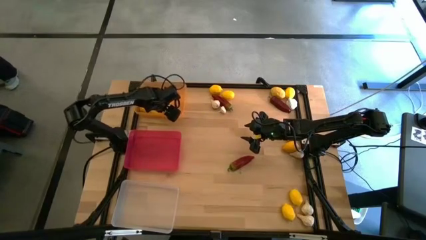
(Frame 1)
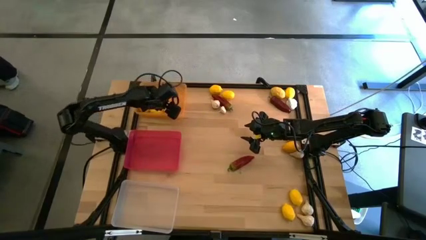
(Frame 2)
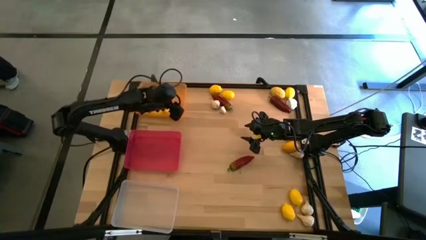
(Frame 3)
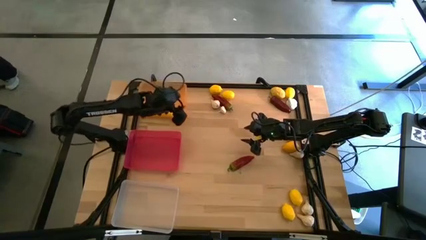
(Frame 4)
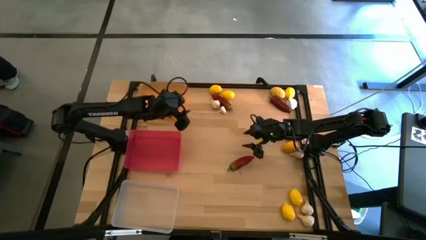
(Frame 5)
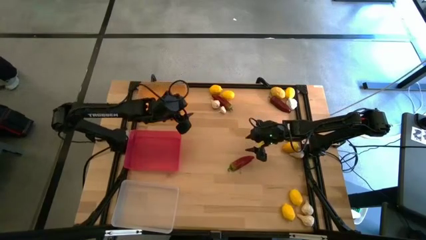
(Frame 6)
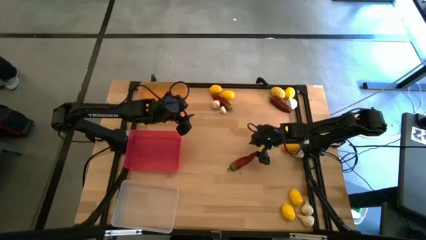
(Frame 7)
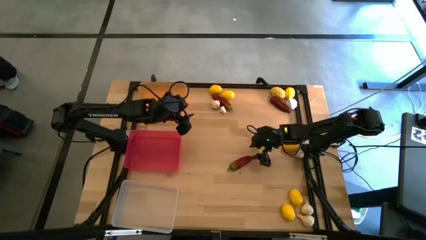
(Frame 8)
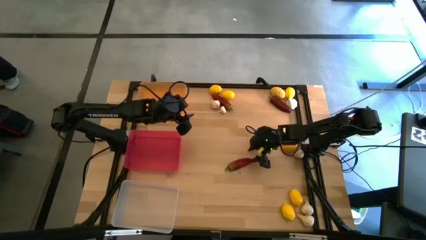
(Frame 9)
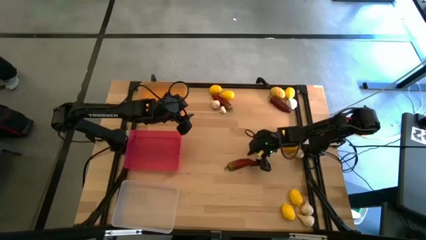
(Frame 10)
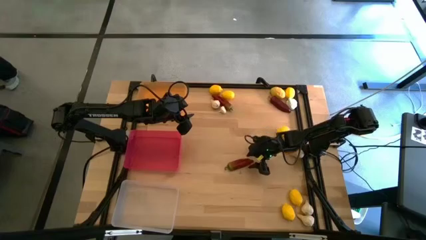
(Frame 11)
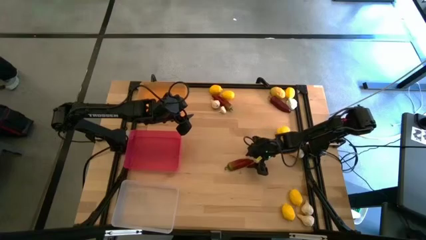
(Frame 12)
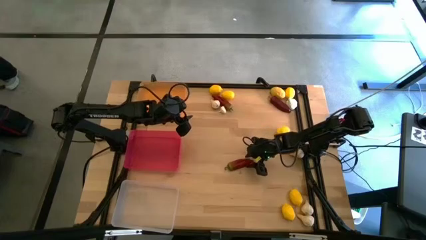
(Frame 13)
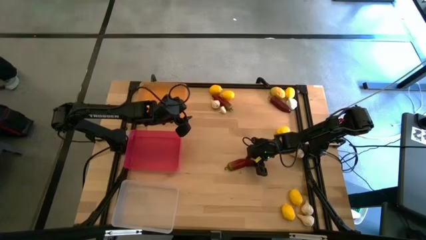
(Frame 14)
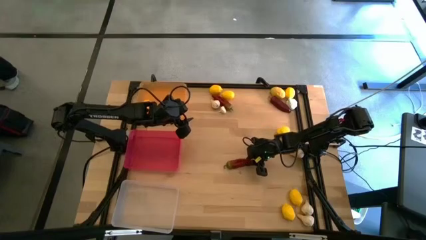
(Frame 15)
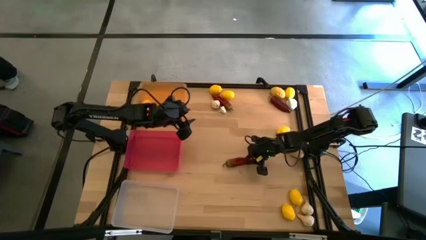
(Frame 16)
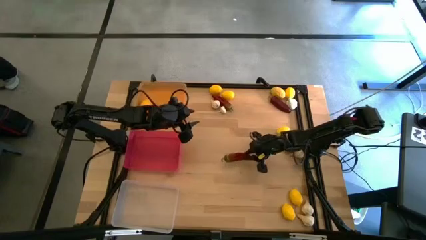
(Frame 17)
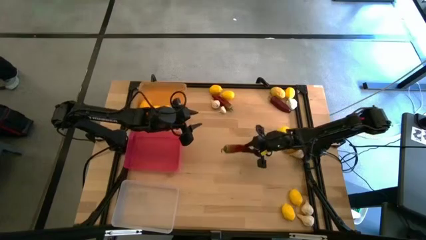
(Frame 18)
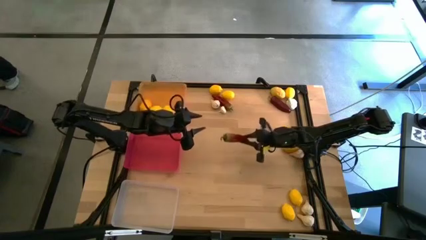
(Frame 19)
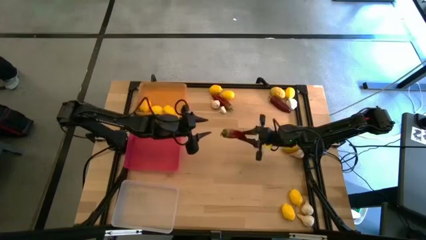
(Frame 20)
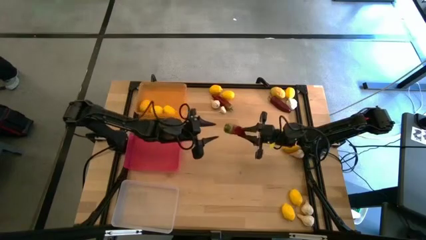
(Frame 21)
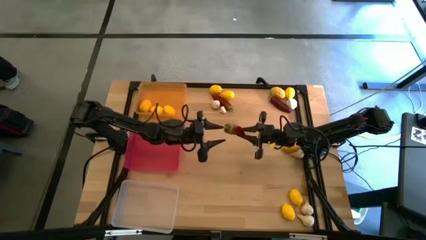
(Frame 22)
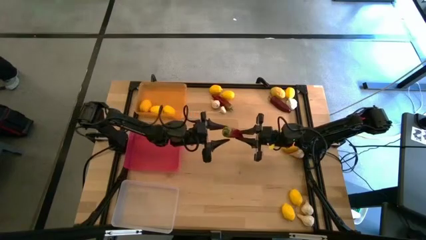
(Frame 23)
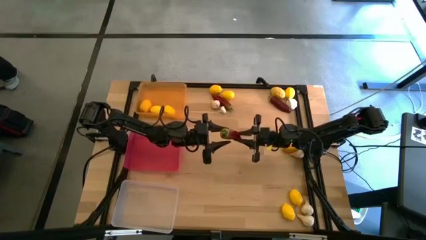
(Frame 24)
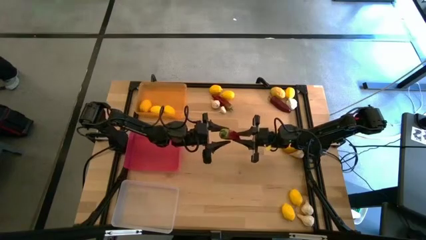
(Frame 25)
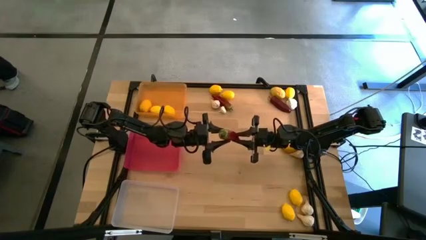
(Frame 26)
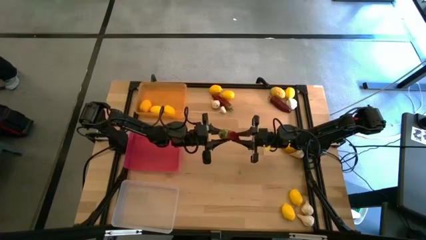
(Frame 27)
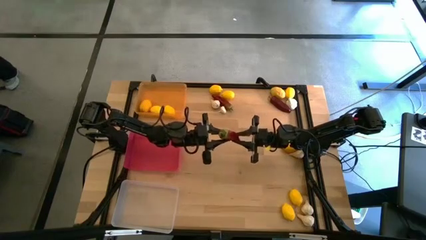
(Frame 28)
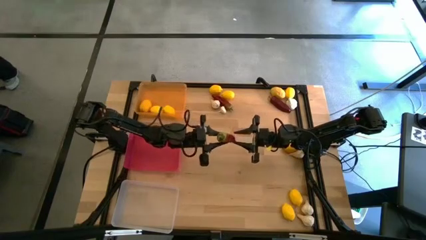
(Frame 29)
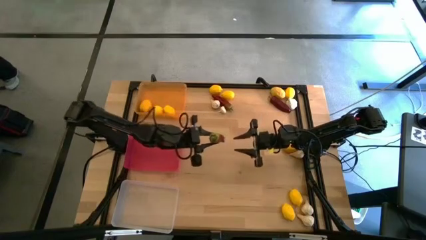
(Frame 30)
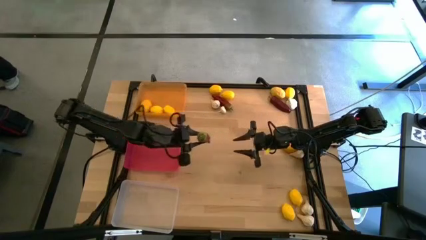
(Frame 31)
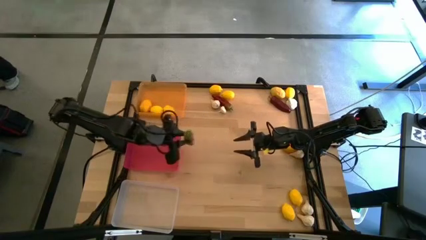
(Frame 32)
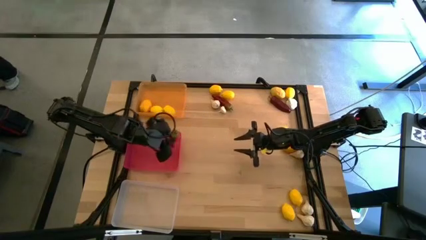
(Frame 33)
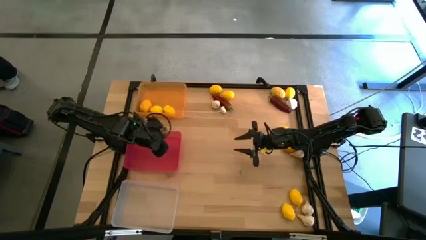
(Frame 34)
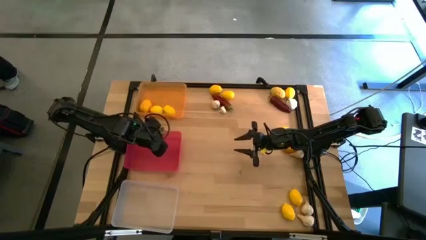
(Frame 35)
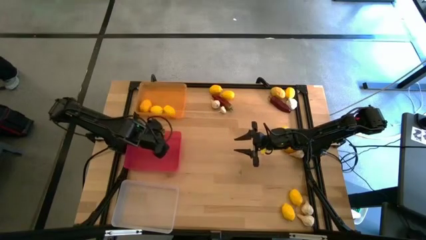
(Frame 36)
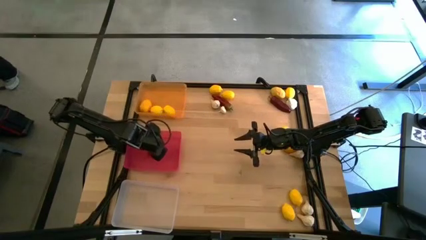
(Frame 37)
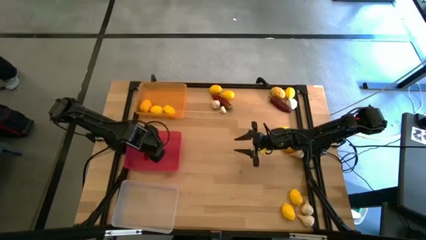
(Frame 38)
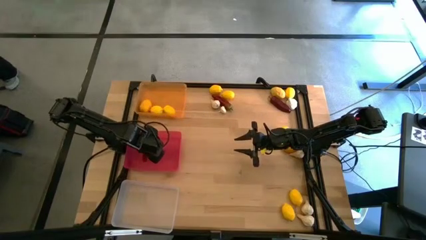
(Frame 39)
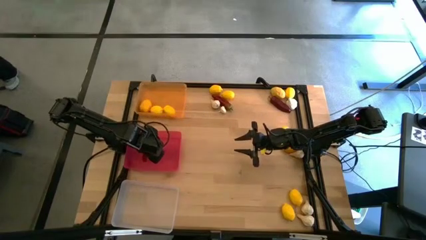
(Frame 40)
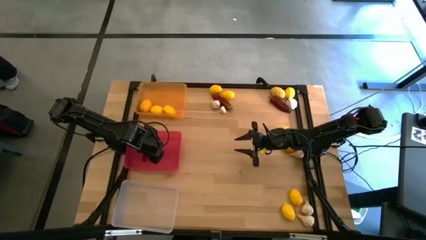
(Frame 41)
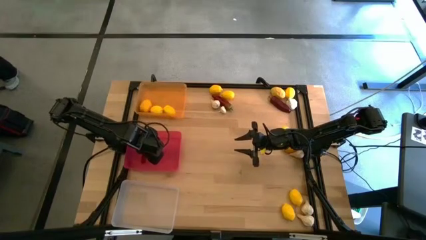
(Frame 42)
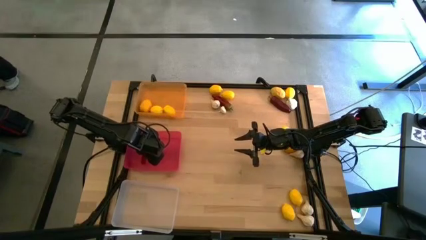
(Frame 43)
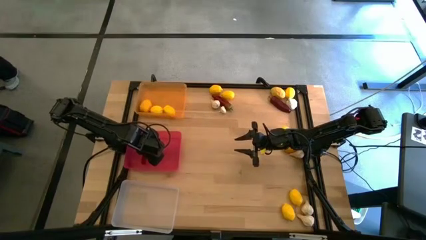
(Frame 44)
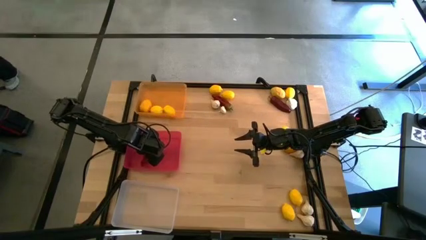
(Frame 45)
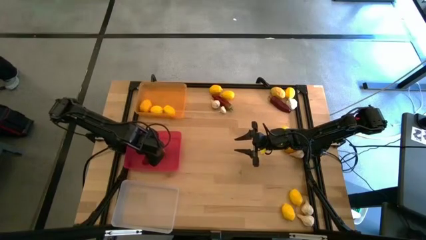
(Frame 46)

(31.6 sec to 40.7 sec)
Task: Sort produce into baskets
Put the bottom chilli pepper into the pink bin

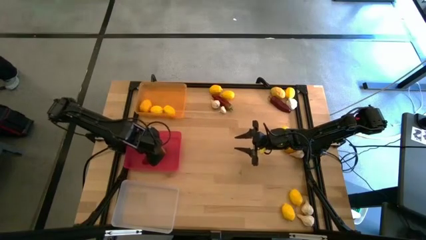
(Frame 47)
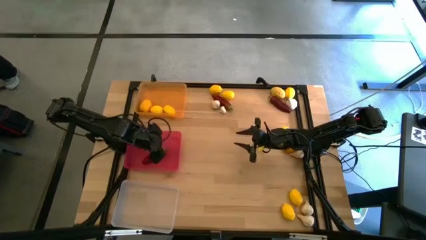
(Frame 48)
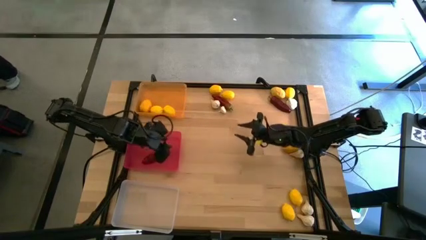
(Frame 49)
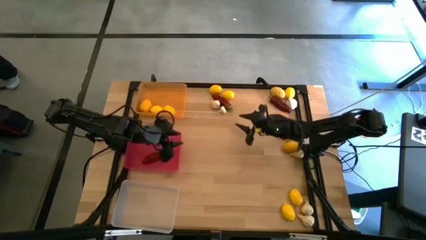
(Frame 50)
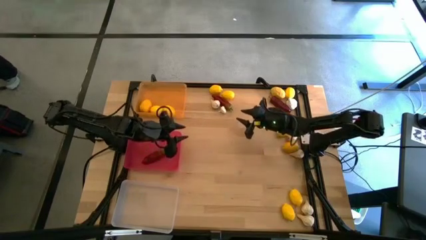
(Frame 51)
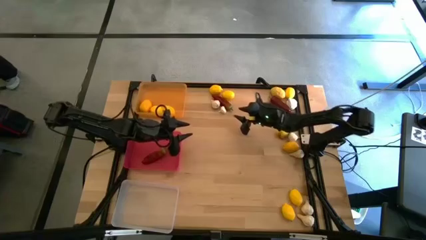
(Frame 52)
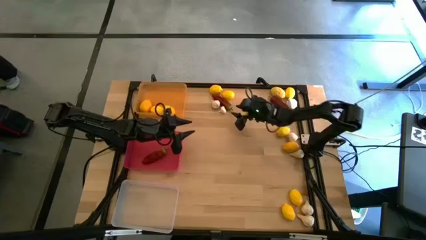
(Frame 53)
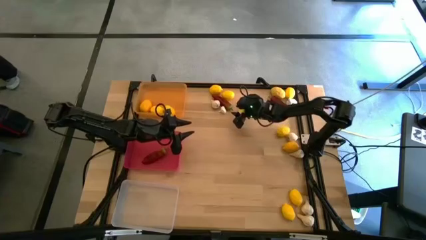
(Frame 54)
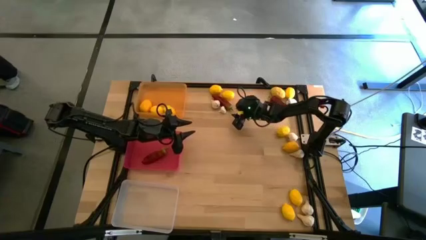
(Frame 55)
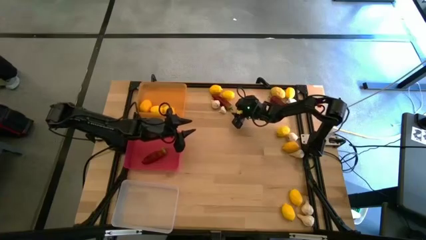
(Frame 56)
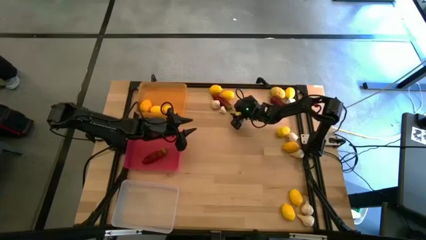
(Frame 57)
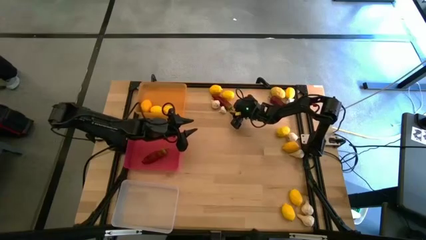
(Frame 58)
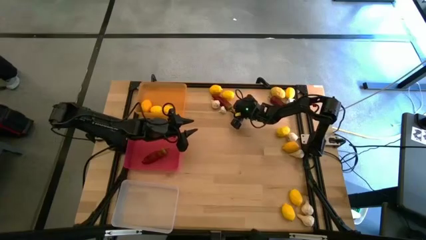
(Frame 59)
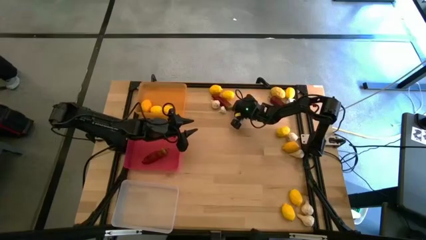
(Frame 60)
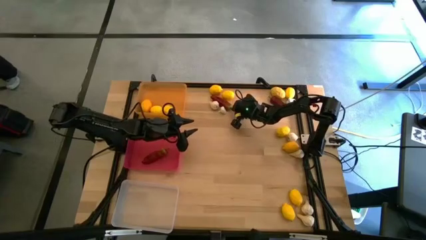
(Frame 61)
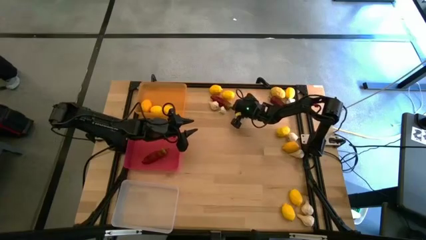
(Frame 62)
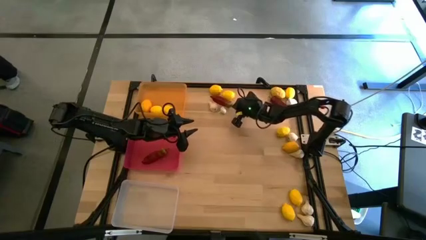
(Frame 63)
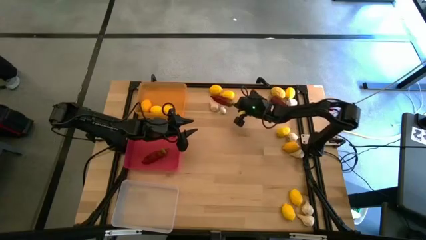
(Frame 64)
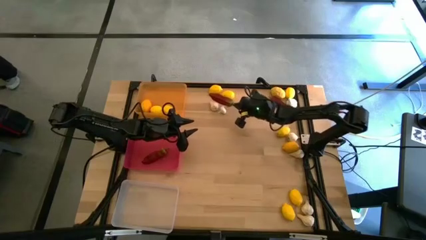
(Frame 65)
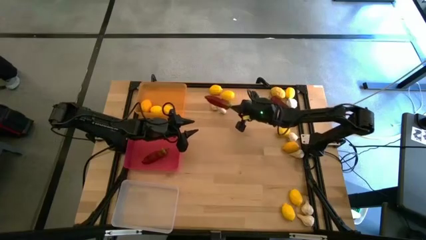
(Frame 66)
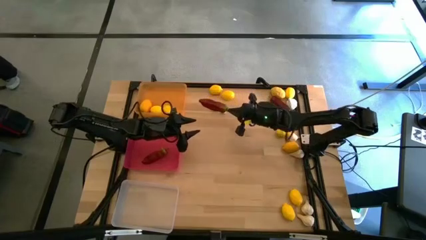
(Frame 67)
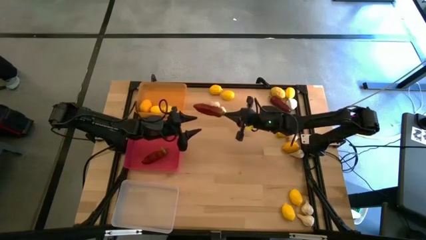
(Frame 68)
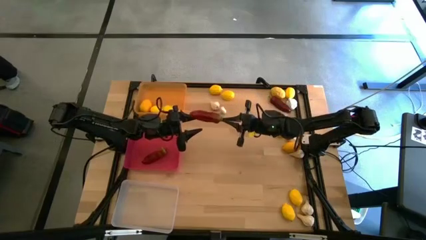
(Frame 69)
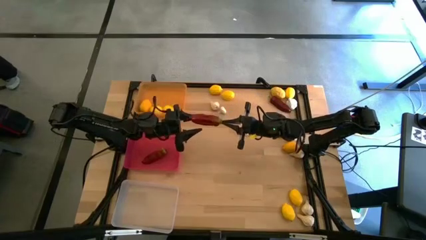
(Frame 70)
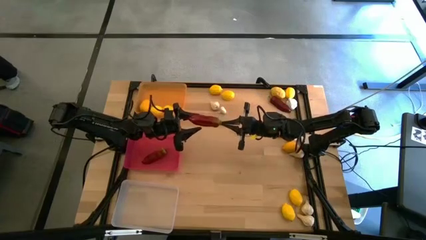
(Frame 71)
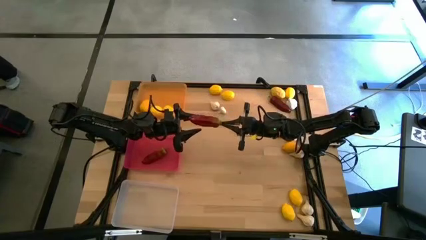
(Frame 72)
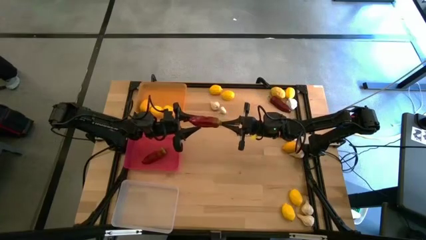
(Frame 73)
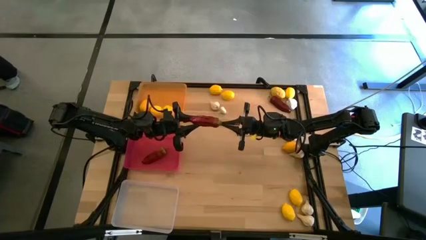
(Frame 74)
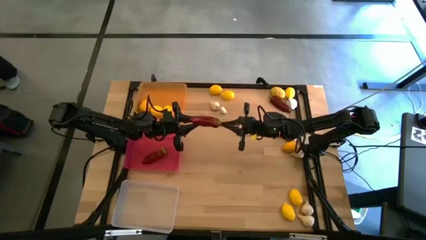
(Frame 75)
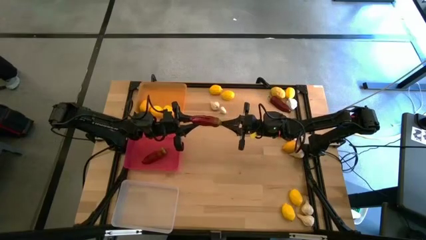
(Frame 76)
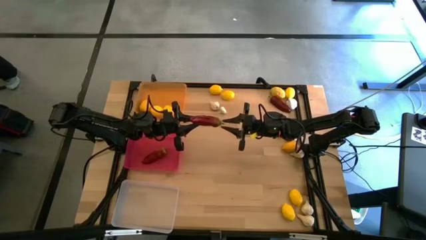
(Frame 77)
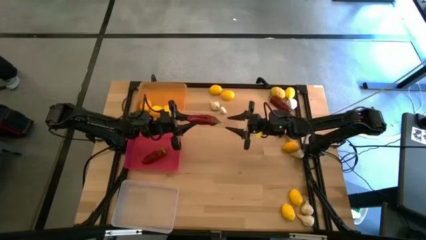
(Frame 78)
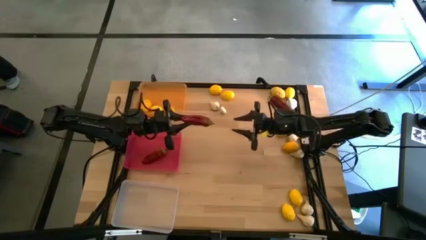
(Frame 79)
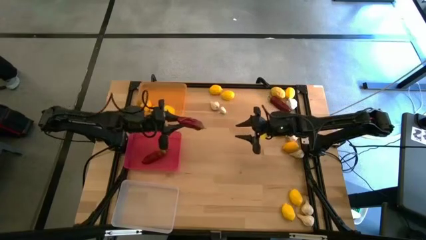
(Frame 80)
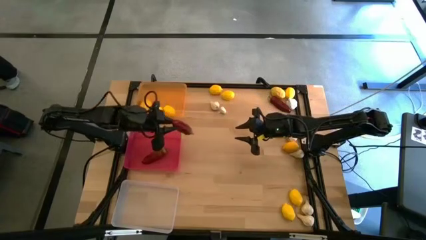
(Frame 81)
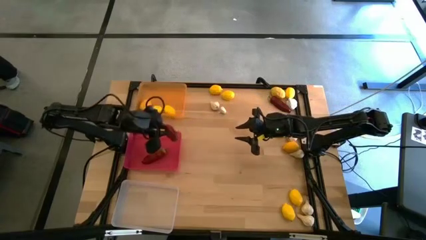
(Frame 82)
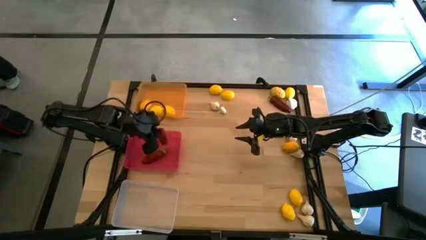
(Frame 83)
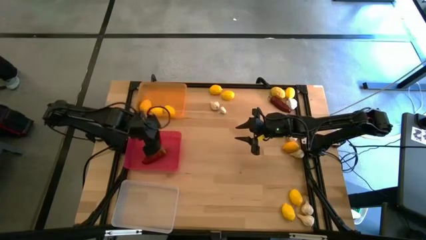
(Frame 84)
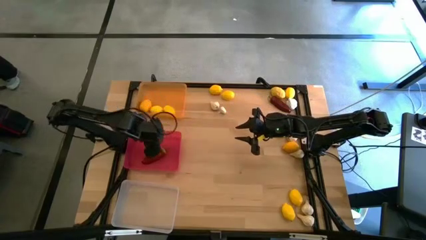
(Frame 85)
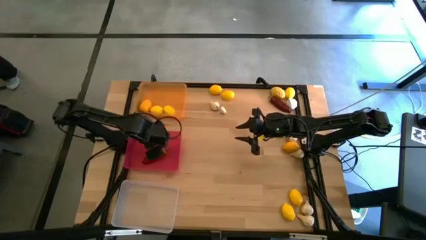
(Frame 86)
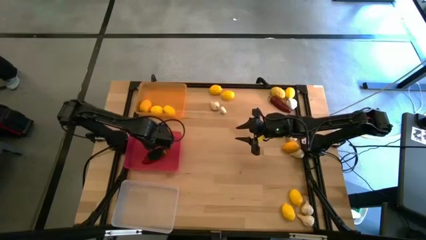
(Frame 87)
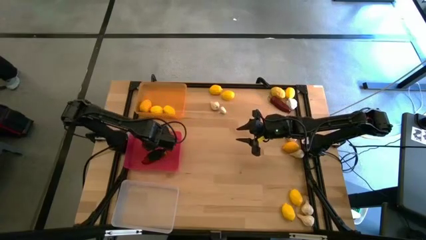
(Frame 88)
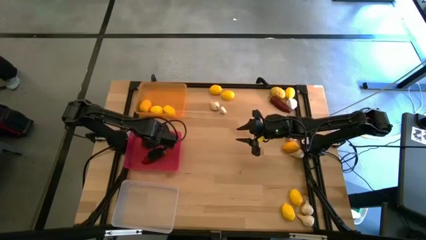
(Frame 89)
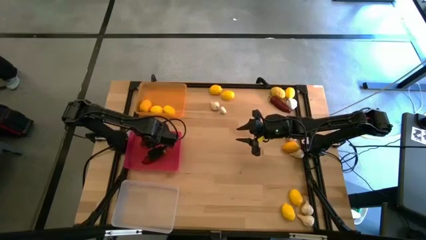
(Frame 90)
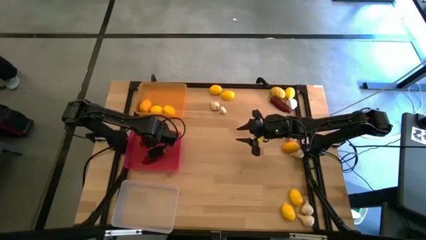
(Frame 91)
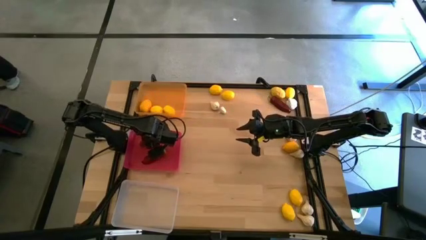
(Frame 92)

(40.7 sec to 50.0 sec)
Put the left chilli pepper into the pink bin
